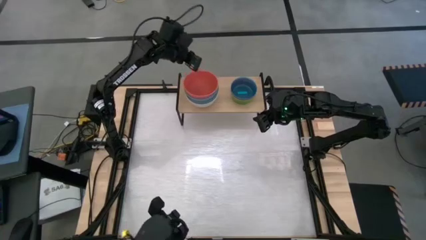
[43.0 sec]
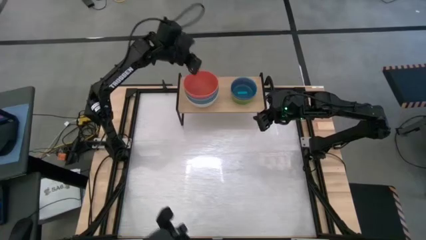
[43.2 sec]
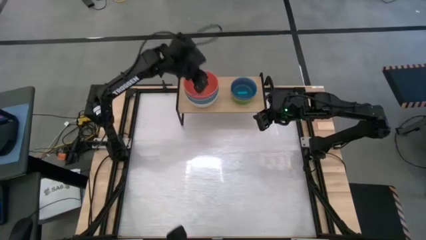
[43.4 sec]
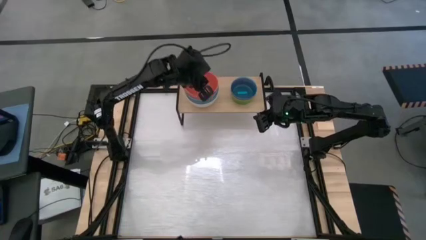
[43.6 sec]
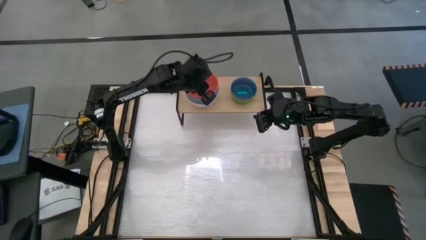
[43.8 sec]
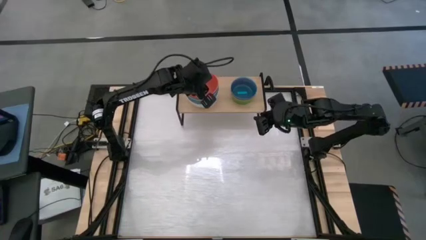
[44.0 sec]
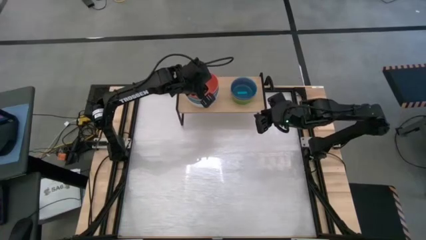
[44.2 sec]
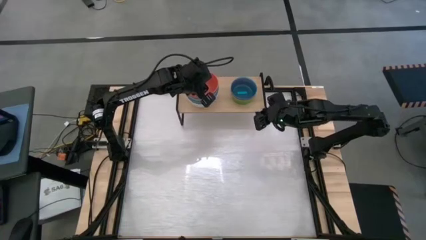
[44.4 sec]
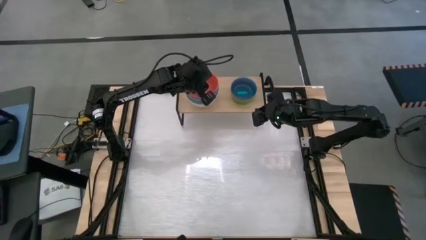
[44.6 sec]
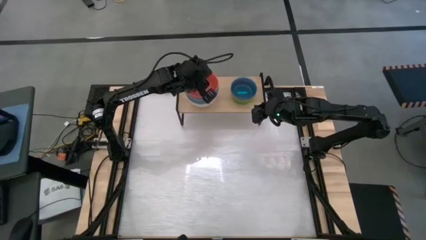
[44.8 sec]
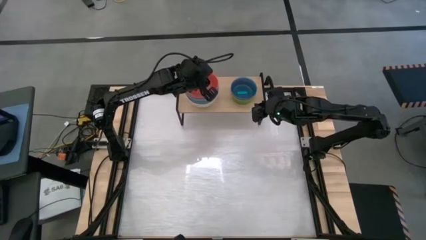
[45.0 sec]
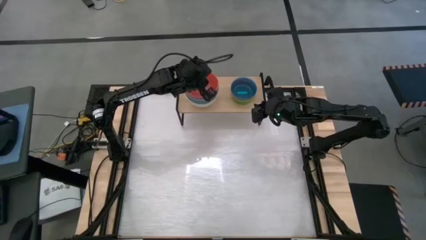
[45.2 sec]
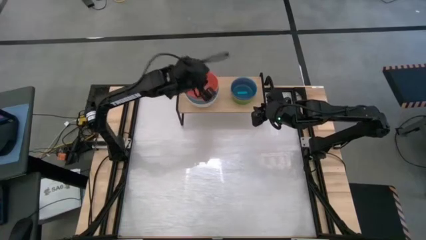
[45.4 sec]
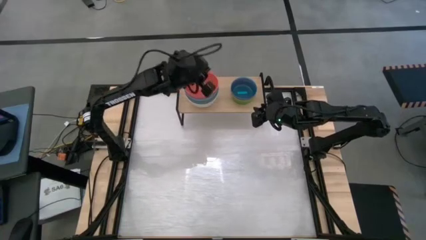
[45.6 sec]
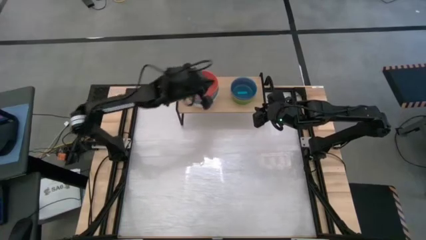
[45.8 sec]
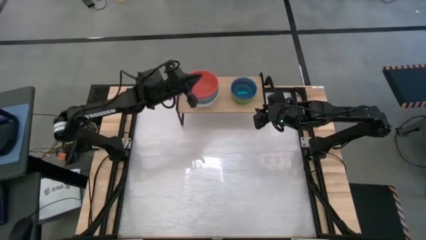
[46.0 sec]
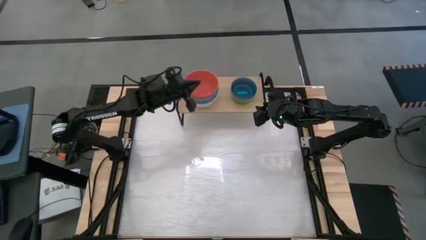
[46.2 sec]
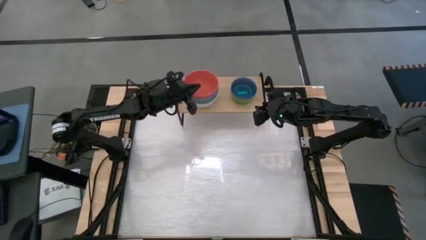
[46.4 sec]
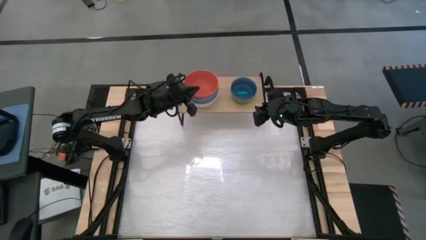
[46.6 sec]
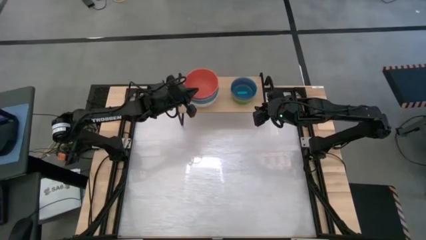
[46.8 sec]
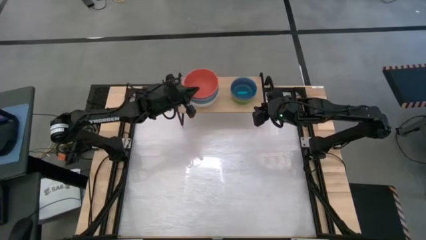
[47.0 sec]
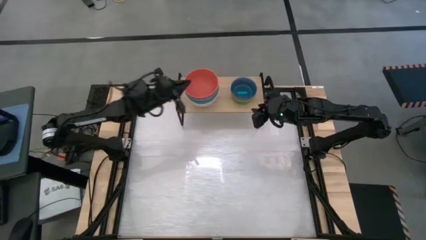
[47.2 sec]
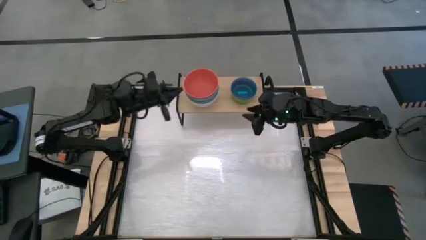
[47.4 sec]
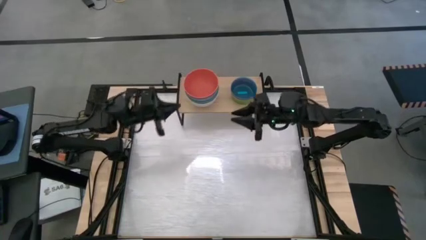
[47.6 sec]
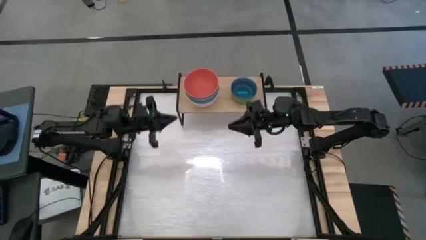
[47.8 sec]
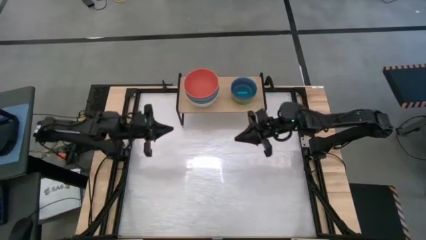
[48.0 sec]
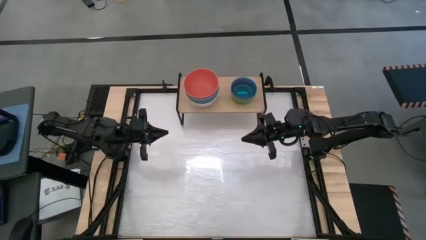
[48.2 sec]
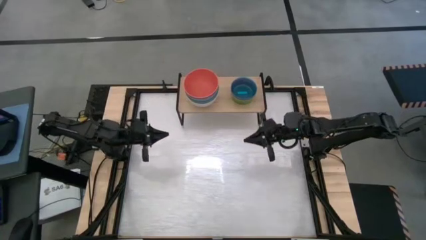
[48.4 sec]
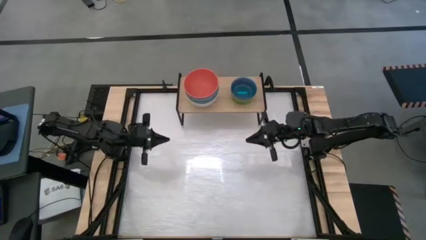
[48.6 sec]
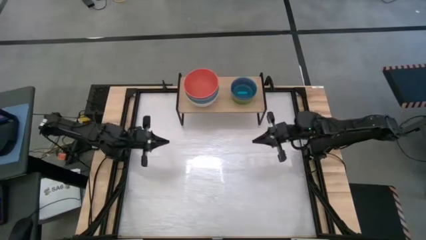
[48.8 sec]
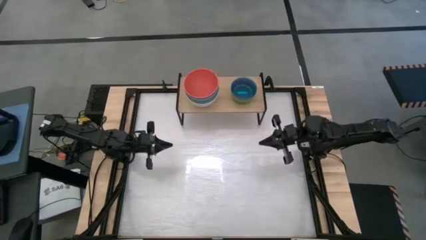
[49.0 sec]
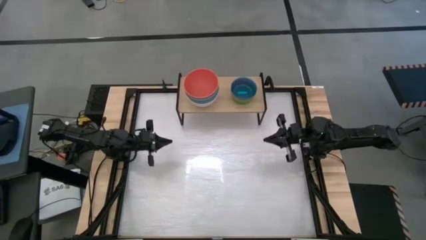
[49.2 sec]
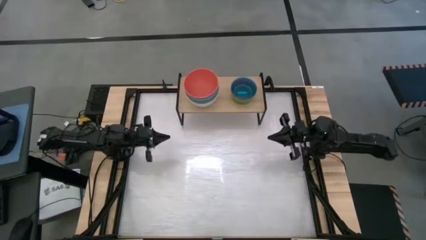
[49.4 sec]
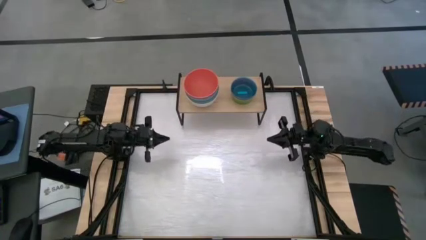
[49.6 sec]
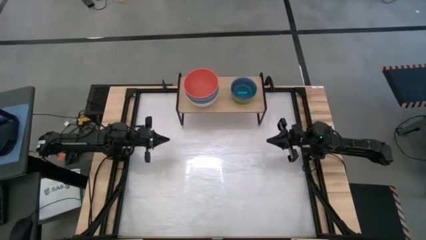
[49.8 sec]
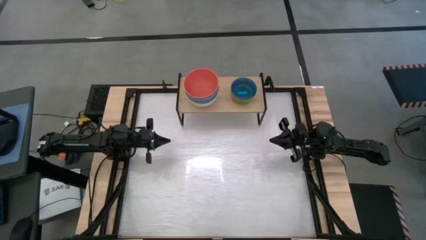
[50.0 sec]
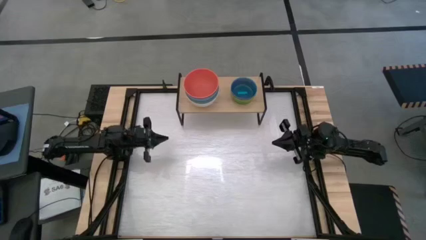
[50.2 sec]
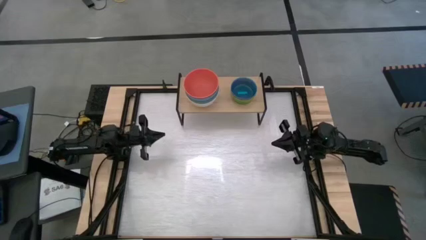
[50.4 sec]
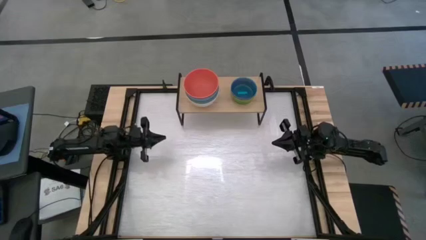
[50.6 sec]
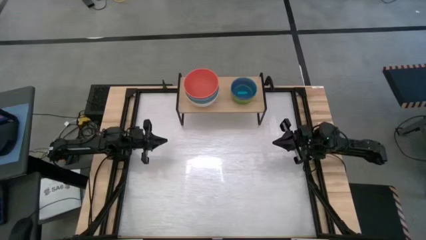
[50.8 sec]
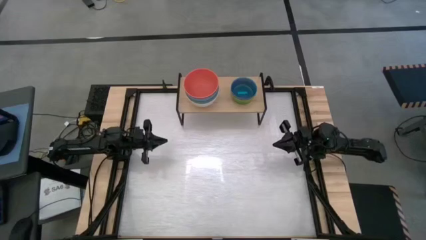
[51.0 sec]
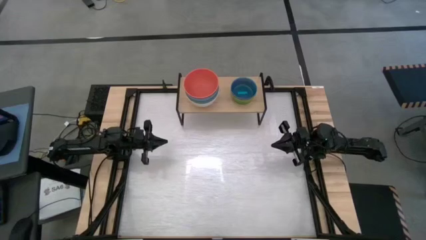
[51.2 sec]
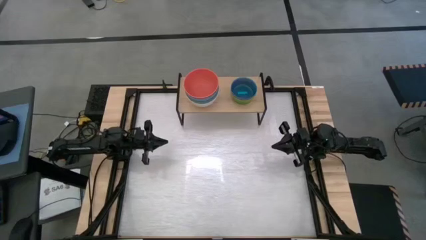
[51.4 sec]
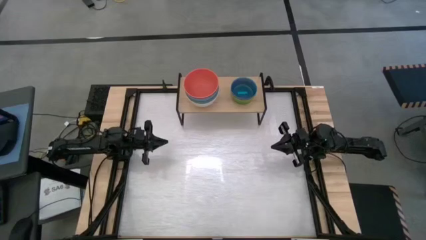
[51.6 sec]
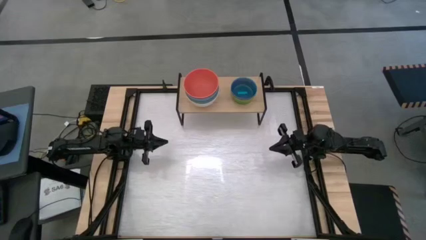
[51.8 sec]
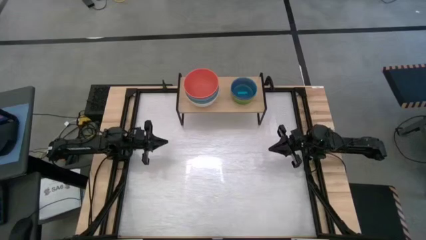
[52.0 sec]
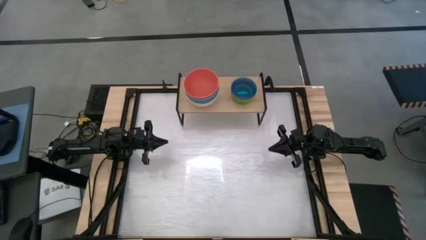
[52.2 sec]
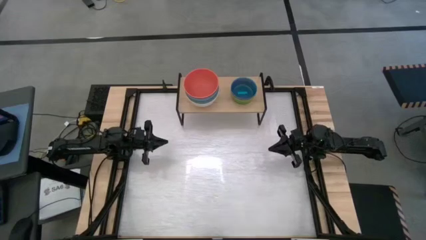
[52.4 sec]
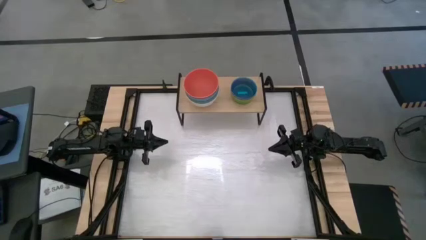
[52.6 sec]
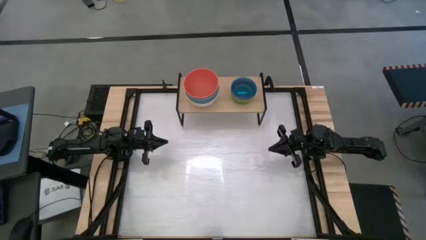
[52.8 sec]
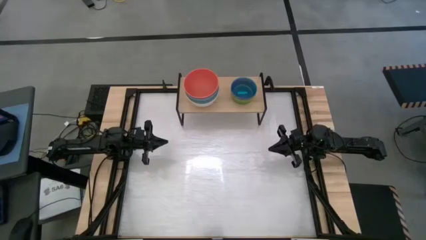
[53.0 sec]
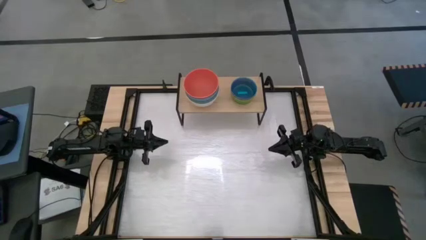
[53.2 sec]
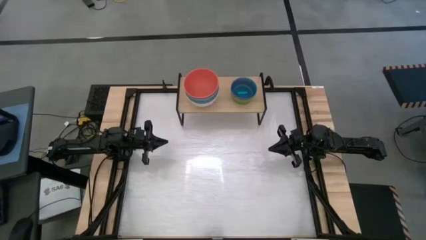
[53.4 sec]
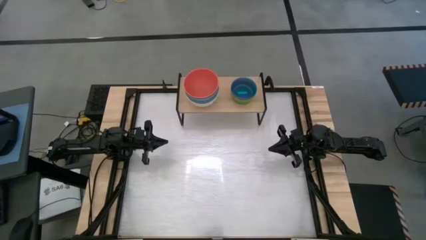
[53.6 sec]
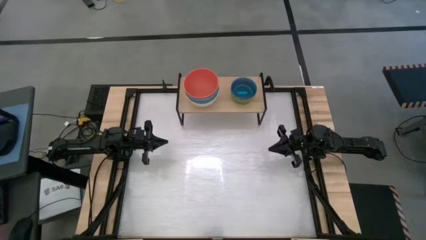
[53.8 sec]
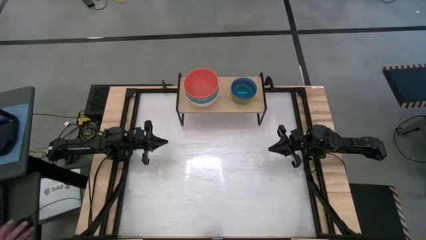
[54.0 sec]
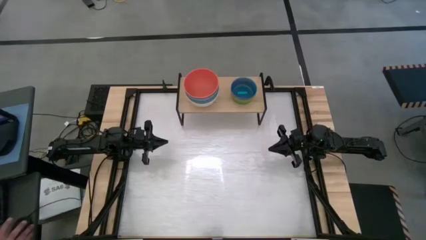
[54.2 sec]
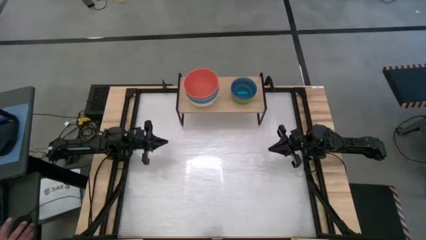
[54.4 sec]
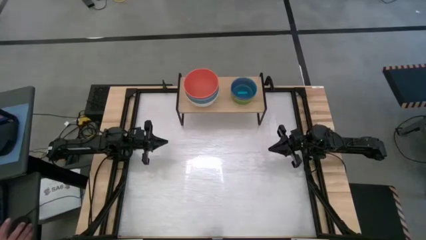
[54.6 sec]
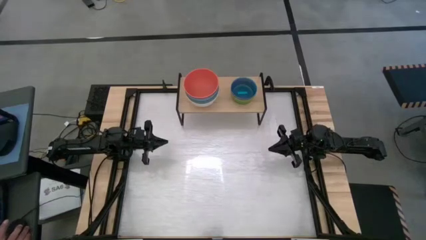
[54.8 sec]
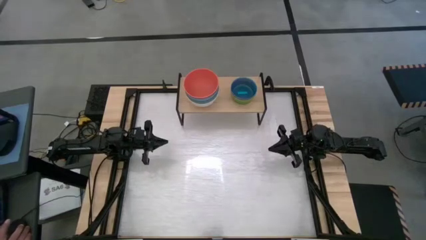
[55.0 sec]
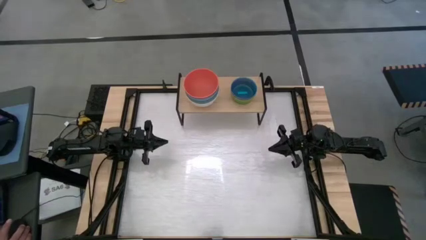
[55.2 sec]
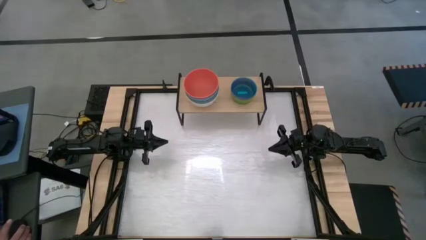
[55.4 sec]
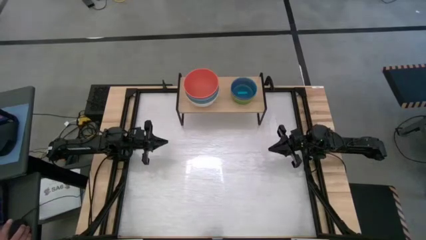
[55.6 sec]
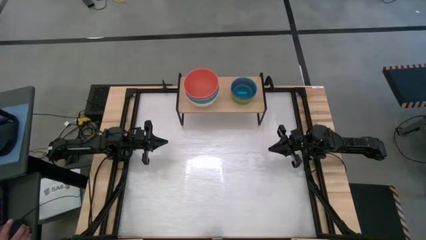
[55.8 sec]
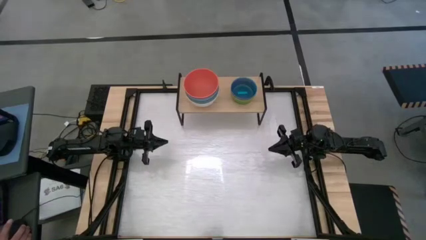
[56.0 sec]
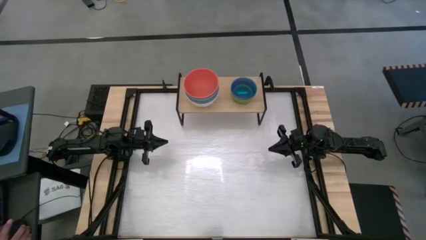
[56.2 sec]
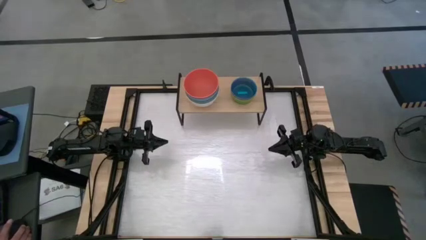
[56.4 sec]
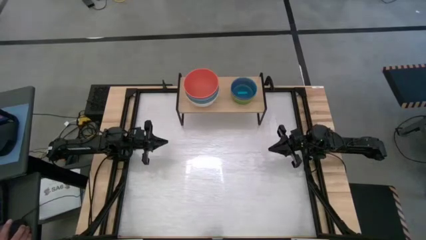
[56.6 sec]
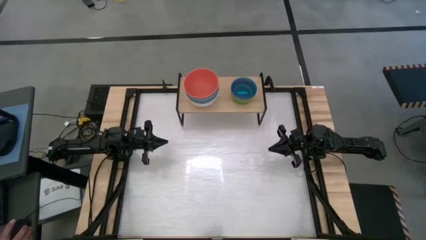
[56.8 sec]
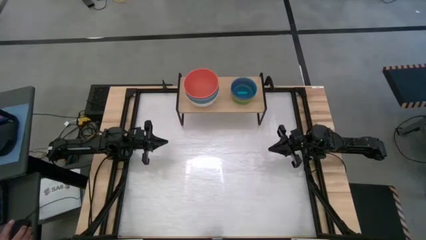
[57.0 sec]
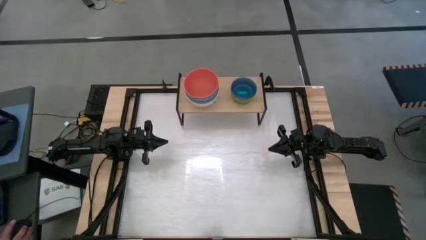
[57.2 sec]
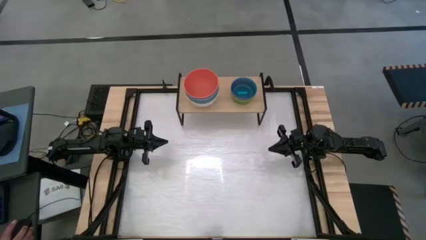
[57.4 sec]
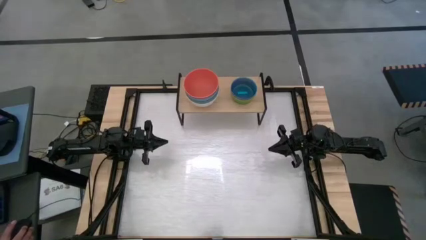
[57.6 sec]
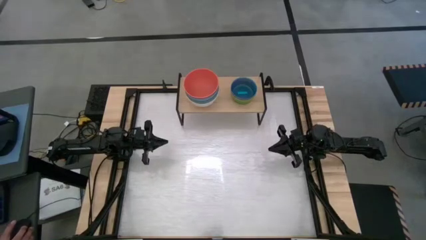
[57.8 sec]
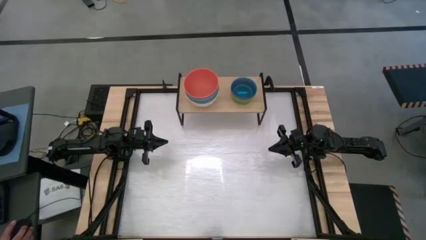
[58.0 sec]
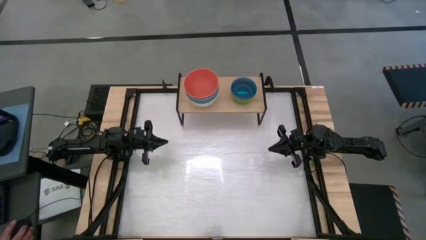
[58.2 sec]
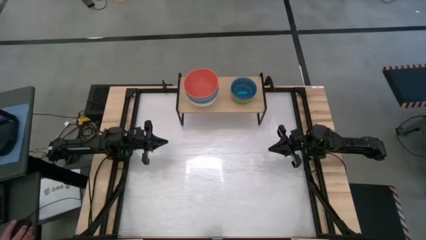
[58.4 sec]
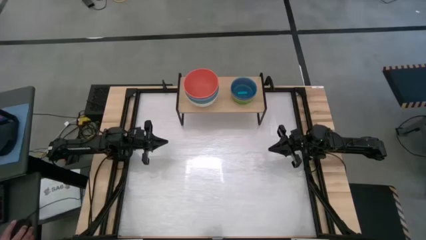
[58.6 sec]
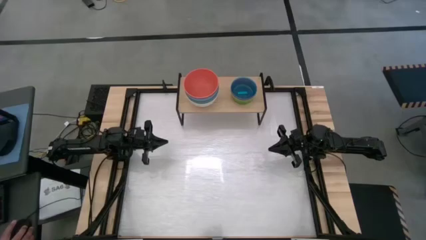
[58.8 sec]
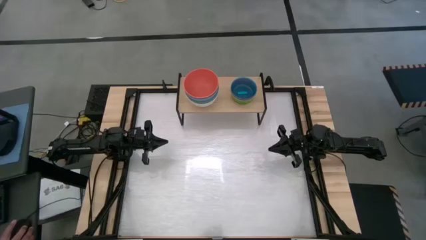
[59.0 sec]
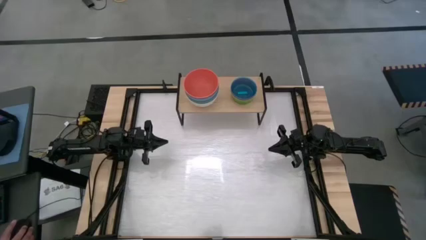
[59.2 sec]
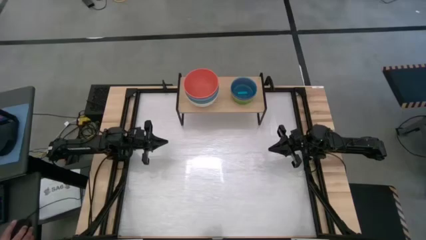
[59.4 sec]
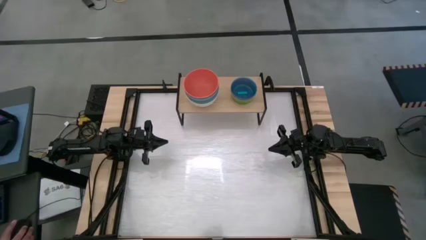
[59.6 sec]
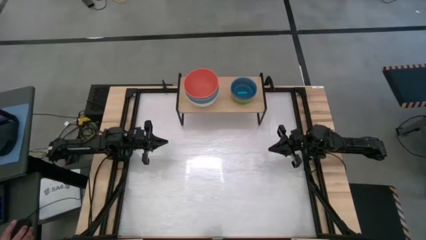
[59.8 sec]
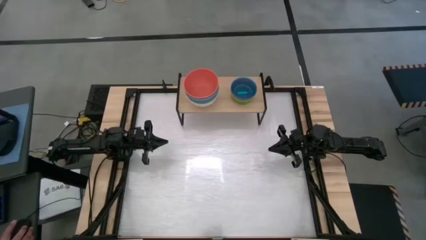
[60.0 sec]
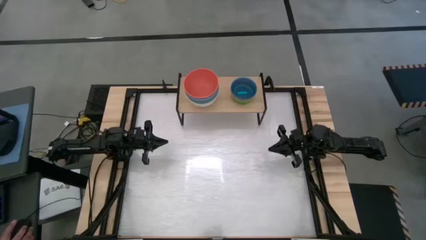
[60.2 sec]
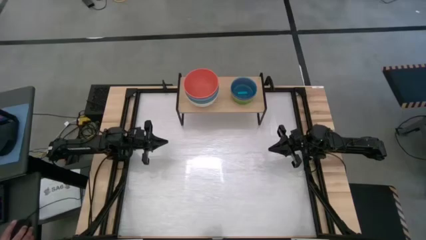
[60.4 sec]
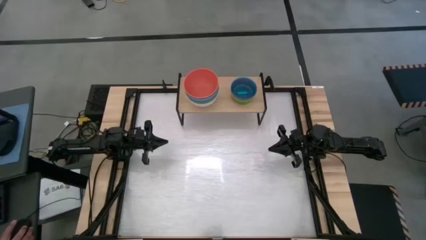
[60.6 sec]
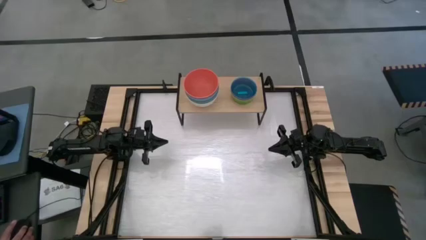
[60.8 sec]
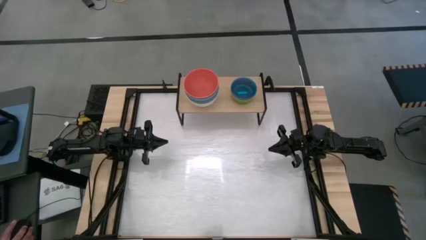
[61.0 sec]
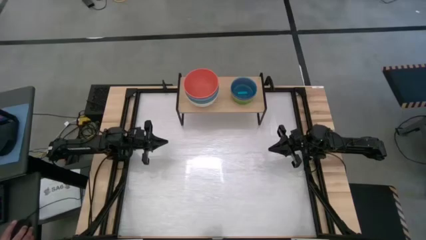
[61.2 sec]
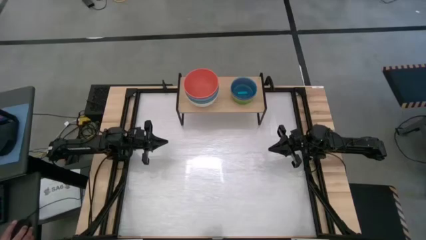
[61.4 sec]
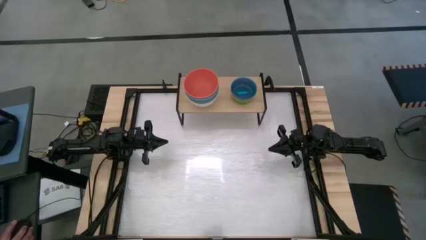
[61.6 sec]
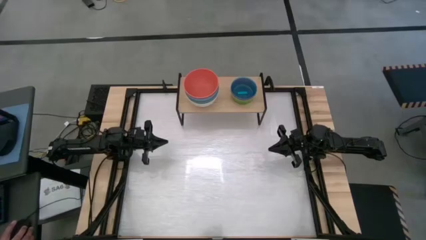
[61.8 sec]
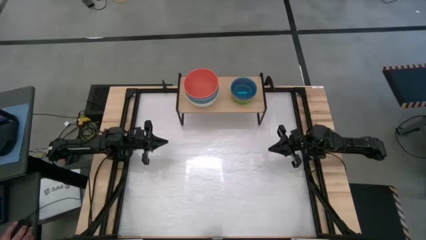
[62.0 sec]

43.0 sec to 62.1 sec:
Task: Place and stack bowls onto a shelf
Return to Home Position
